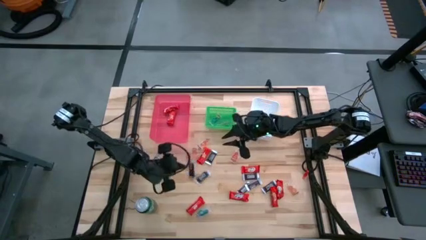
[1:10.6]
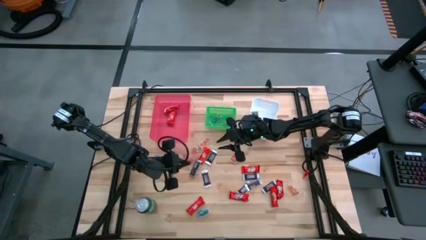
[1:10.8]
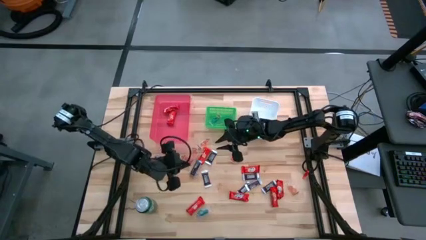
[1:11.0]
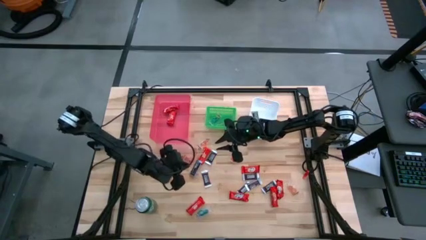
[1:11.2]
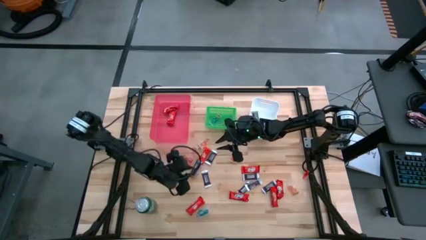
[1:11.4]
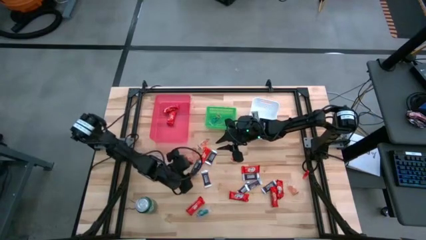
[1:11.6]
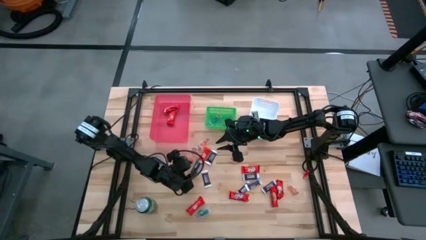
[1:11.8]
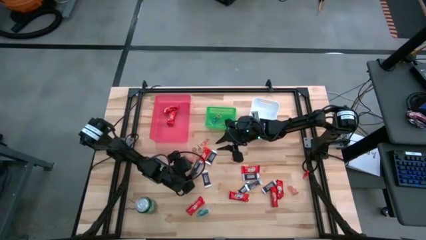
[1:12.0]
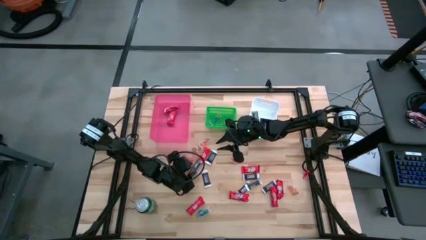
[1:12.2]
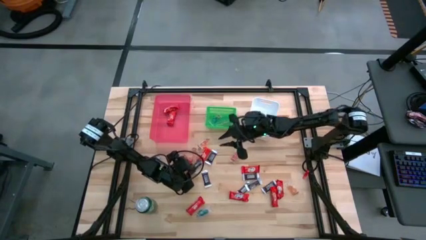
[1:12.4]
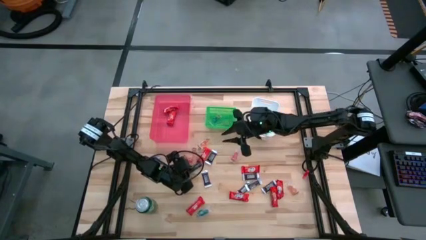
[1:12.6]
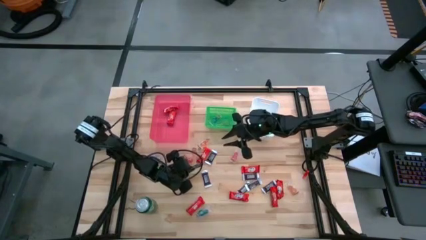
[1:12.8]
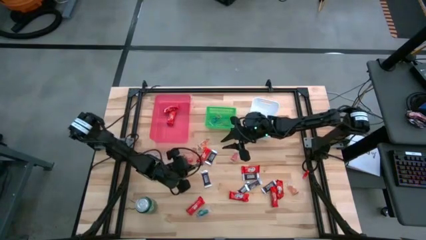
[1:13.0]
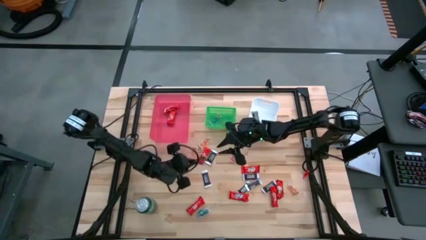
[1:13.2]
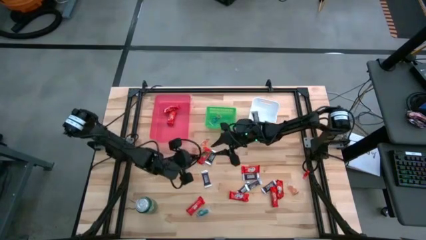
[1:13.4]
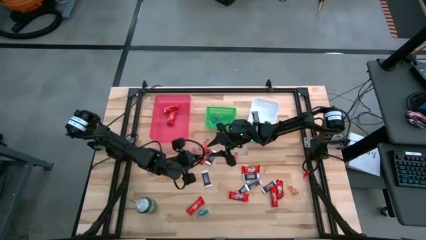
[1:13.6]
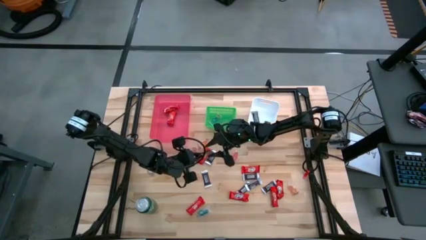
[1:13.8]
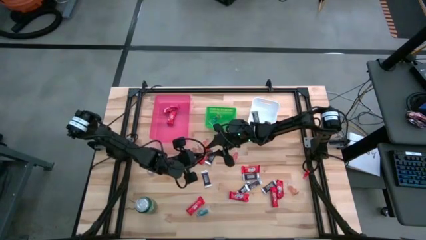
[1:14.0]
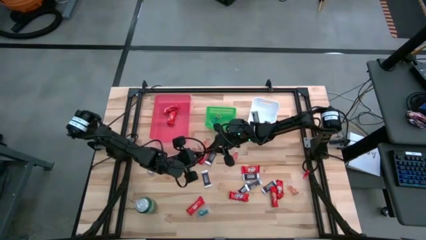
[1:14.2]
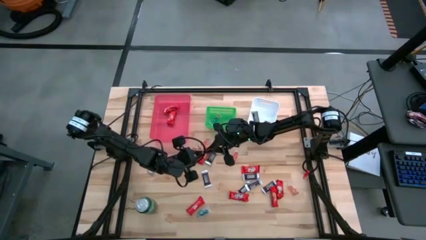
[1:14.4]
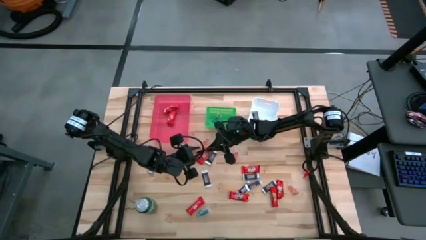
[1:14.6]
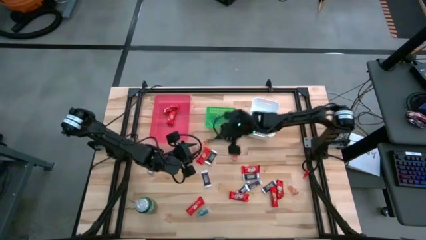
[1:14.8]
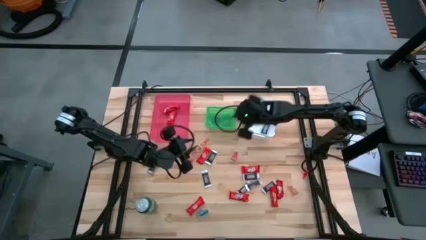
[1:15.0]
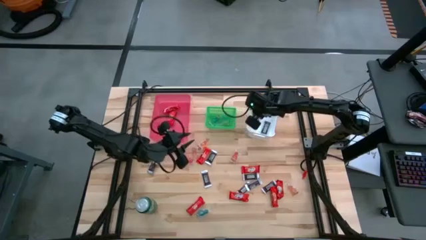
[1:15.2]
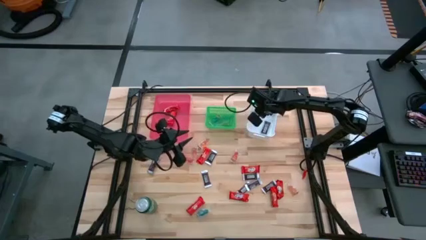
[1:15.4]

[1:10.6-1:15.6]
Task: Sort candy
Put the brown chocolate bar into the white bin

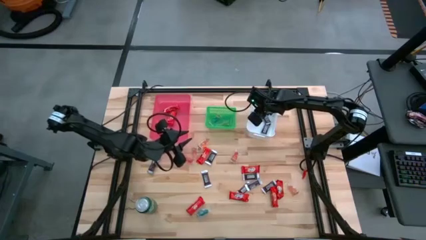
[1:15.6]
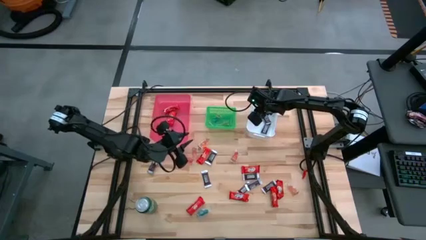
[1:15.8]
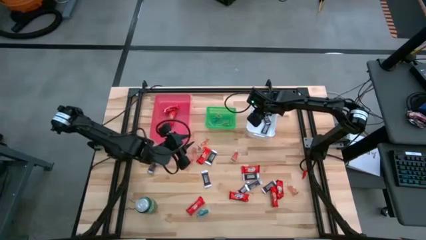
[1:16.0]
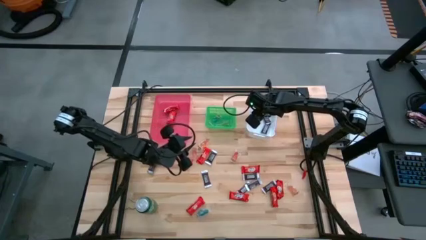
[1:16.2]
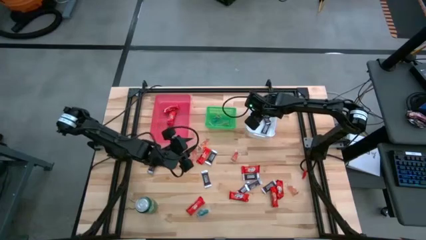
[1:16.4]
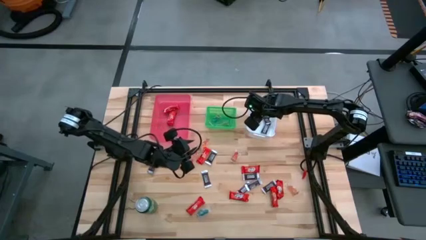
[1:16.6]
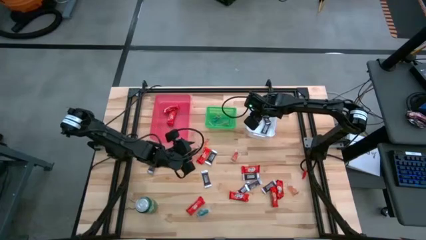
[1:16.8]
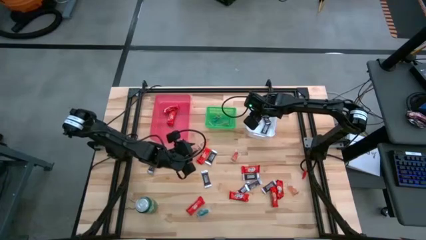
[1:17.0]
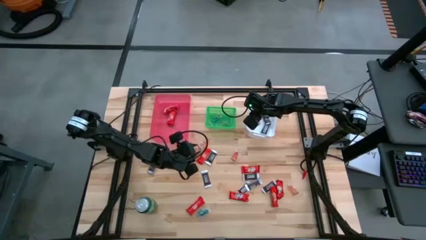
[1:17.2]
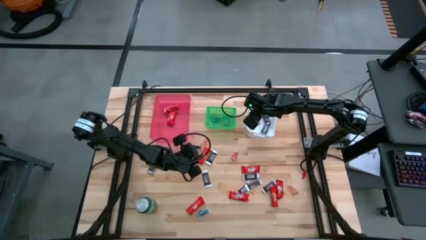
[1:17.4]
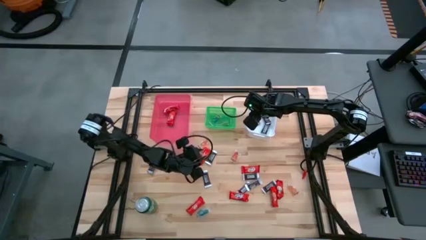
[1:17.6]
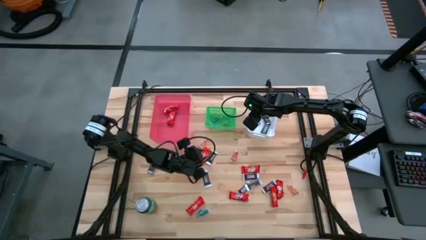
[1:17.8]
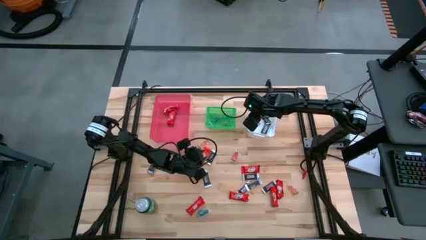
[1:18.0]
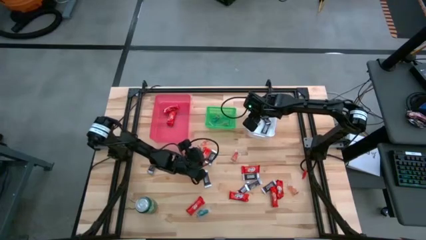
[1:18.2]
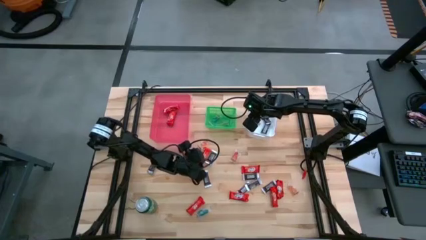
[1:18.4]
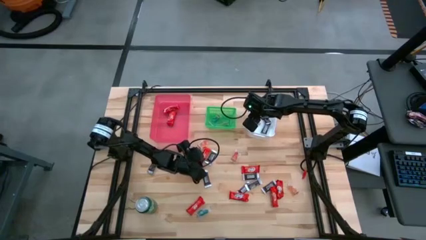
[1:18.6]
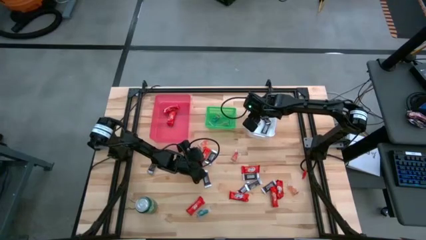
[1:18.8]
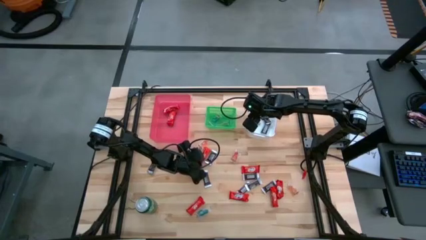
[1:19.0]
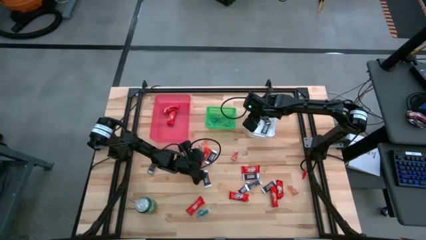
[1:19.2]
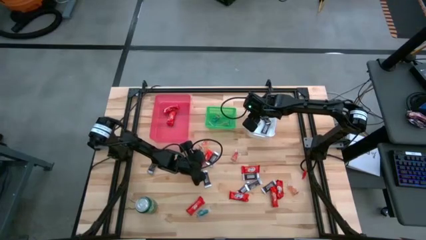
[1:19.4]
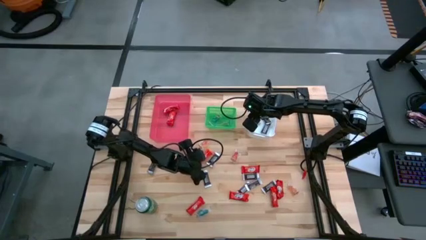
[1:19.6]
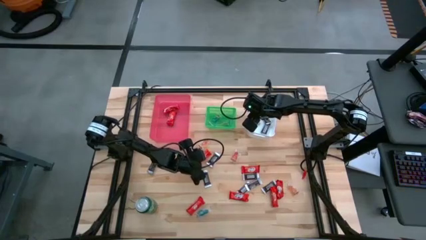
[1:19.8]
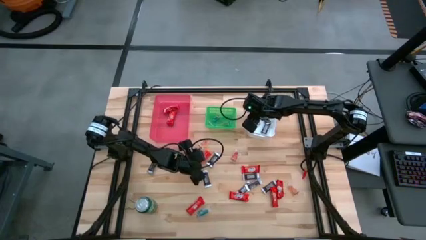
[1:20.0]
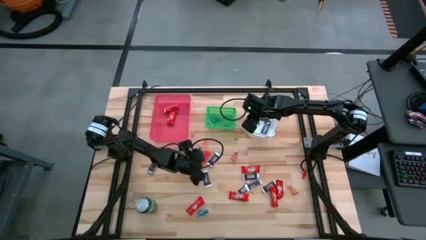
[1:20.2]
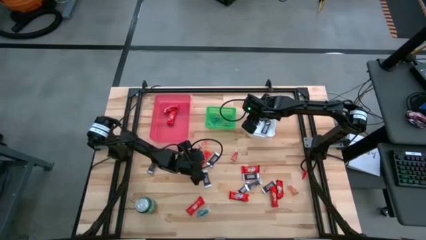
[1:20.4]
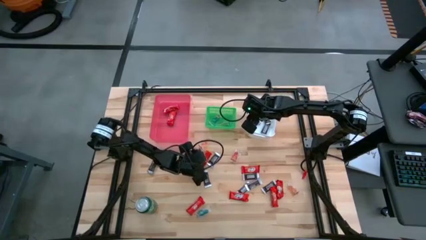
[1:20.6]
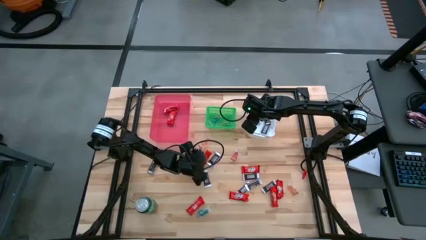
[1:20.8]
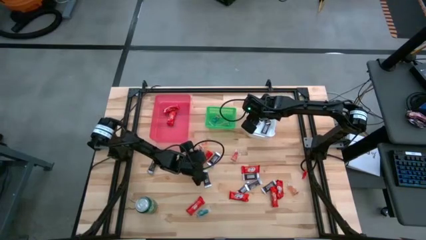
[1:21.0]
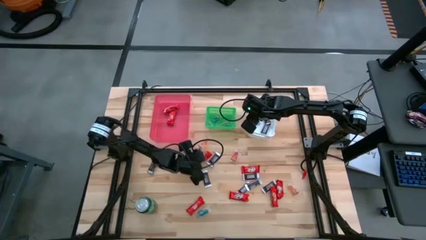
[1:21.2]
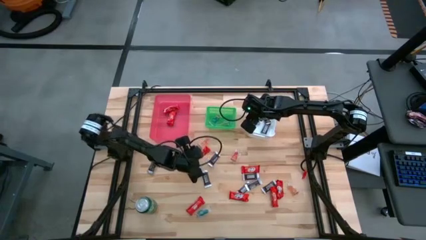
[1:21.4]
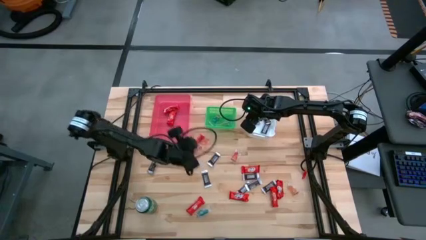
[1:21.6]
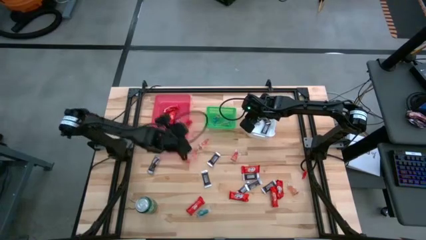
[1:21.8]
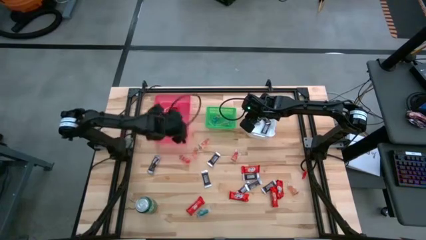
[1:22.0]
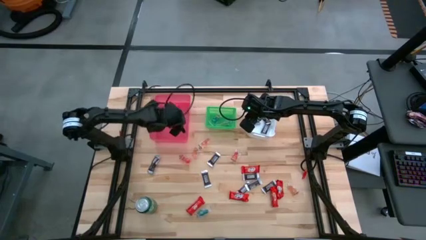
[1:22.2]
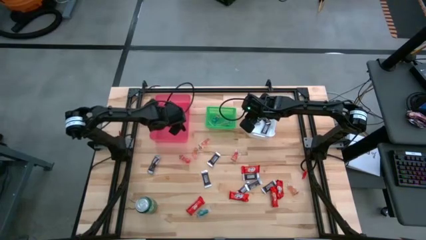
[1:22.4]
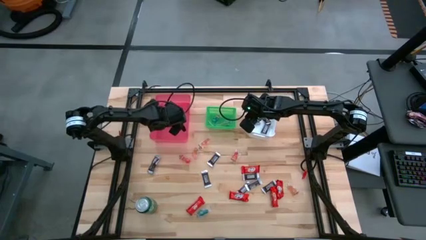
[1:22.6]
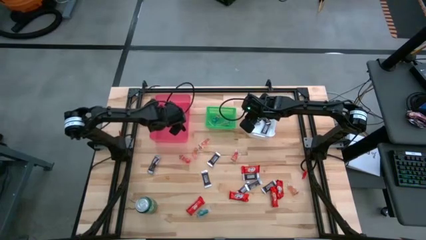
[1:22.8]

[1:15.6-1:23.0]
Put the red chocolate bar into the pink bin

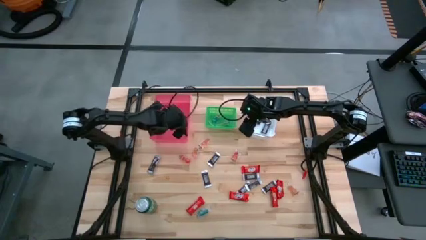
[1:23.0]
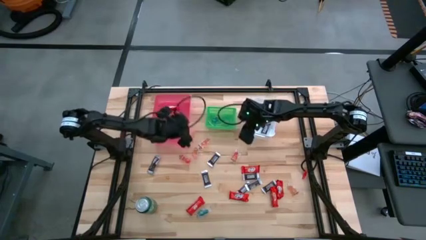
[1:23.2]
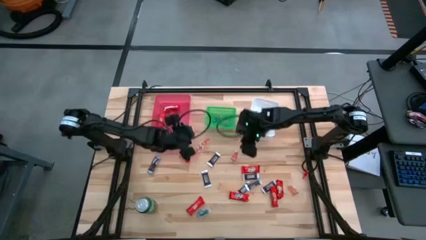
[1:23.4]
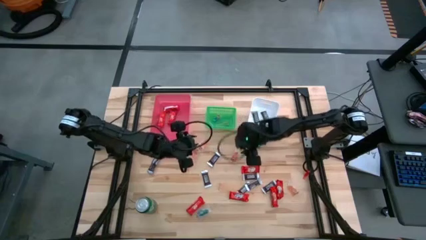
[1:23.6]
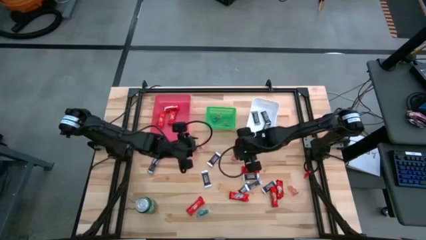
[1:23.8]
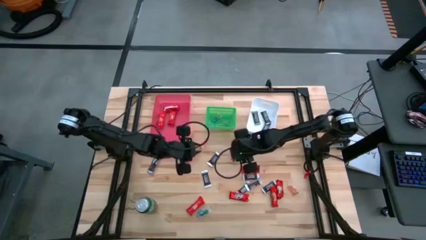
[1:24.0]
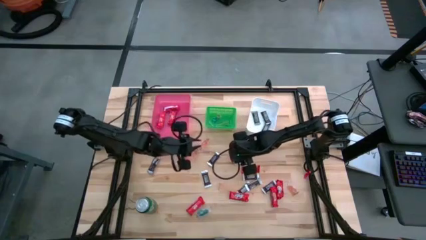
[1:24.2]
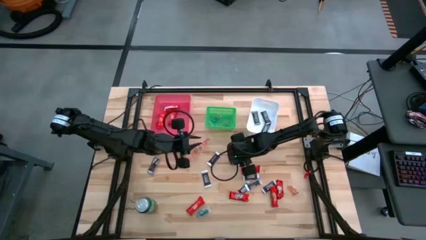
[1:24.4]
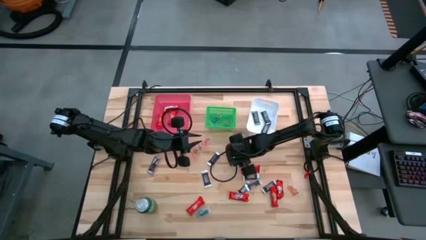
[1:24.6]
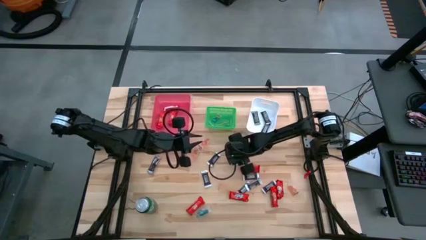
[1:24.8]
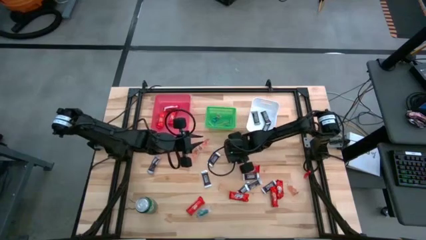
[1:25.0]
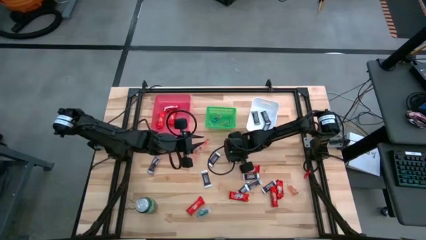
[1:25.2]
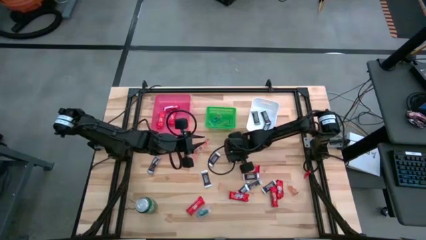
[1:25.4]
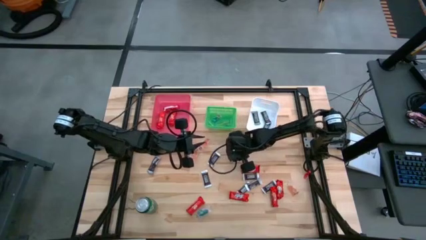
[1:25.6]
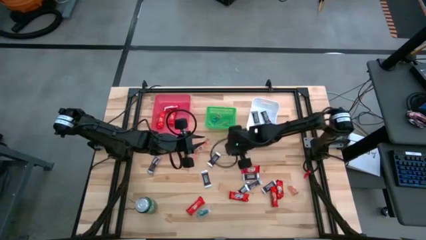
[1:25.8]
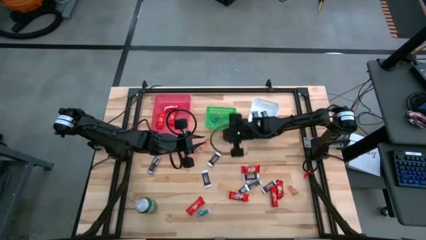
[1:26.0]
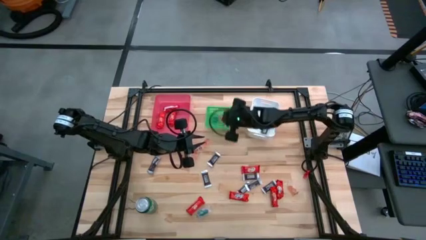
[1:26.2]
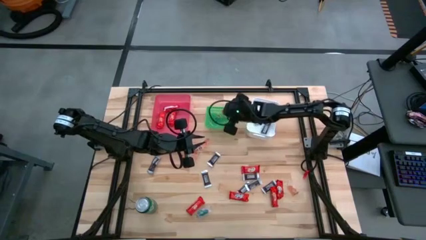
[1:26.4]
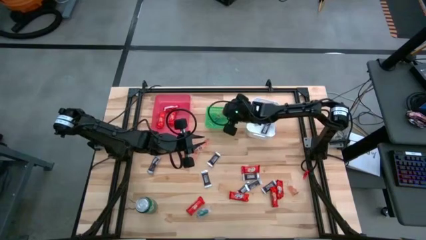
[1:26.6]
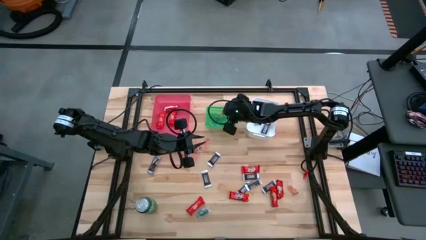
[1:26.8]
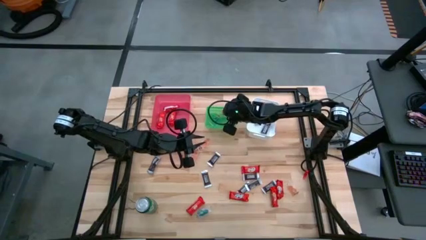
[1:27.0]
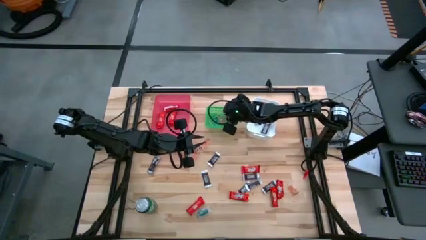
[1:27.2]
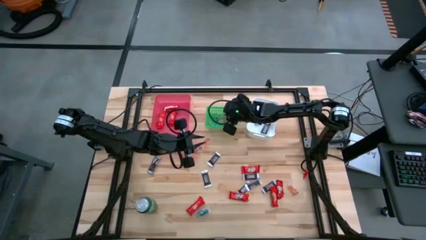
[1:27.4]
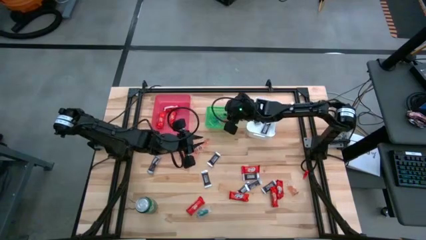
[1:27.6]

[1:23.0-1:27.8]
Put the red gummy into the green bin
